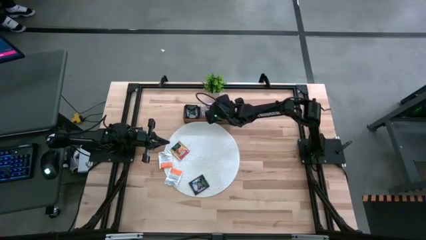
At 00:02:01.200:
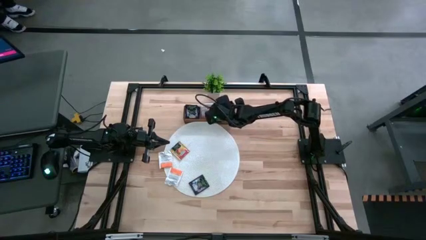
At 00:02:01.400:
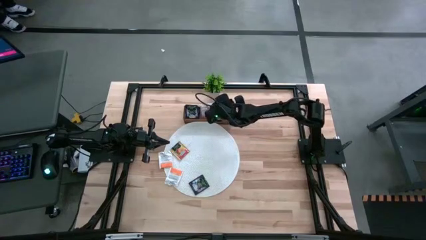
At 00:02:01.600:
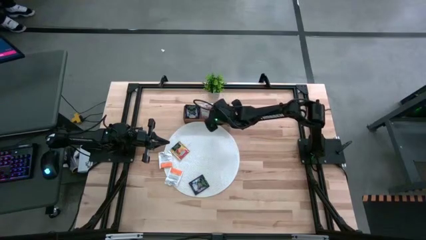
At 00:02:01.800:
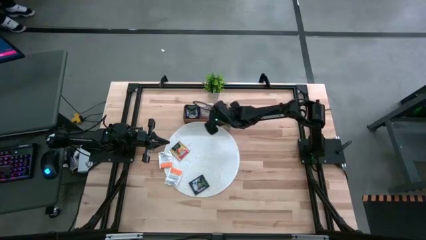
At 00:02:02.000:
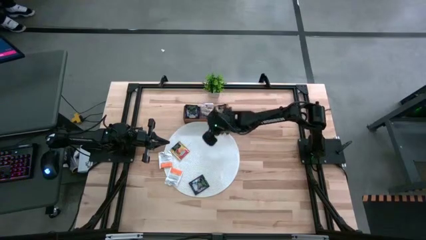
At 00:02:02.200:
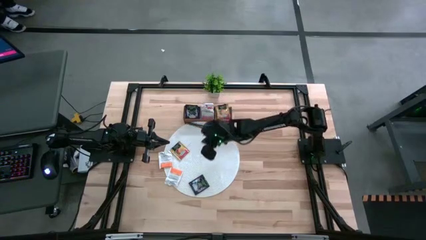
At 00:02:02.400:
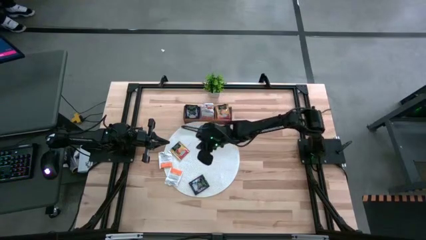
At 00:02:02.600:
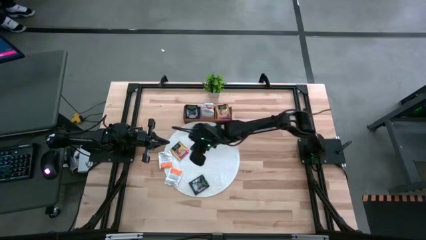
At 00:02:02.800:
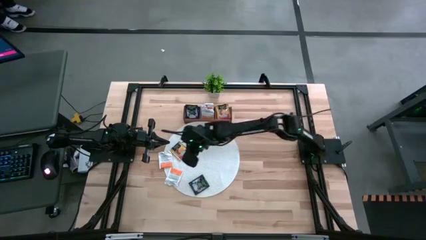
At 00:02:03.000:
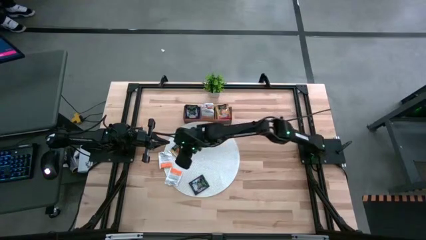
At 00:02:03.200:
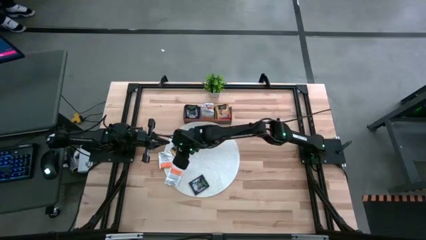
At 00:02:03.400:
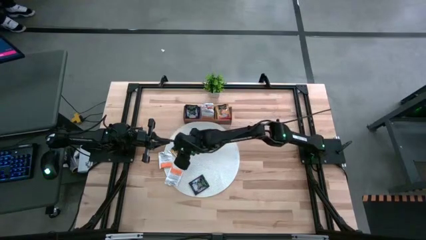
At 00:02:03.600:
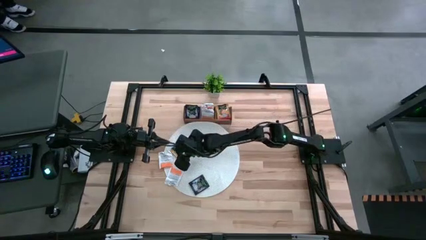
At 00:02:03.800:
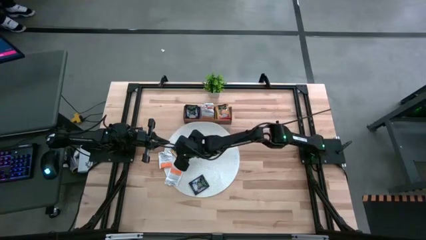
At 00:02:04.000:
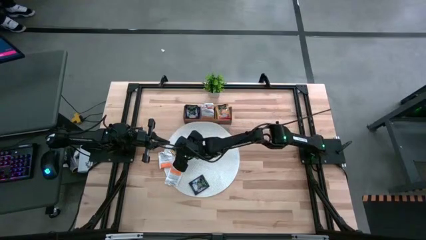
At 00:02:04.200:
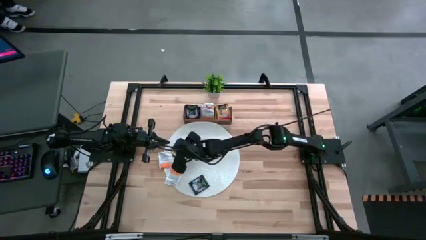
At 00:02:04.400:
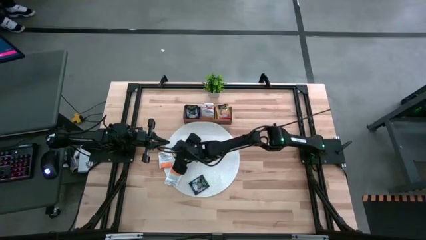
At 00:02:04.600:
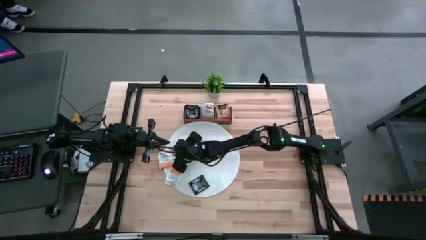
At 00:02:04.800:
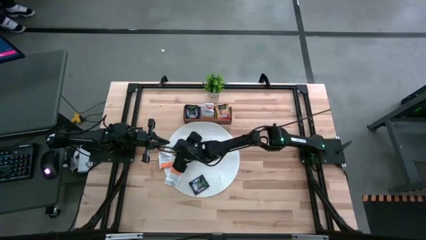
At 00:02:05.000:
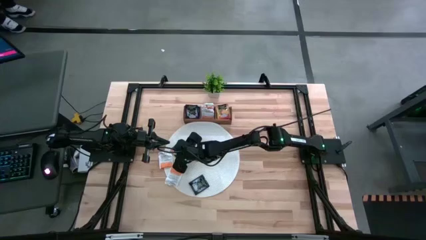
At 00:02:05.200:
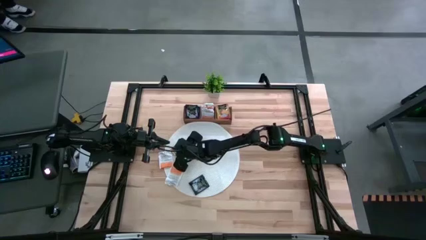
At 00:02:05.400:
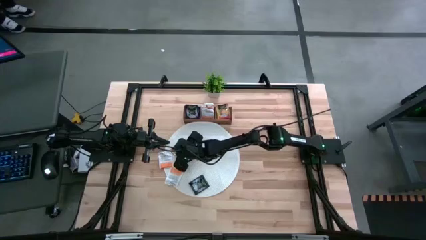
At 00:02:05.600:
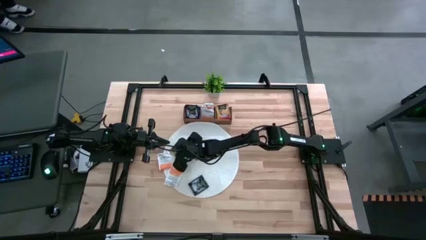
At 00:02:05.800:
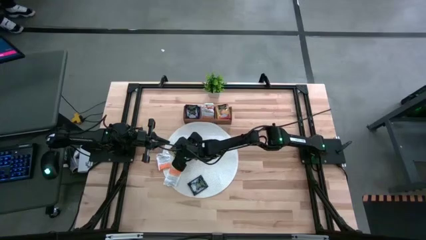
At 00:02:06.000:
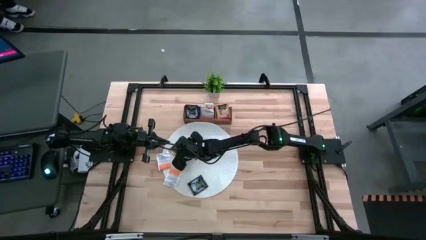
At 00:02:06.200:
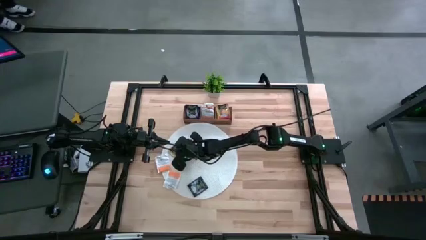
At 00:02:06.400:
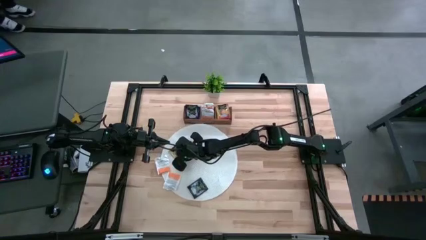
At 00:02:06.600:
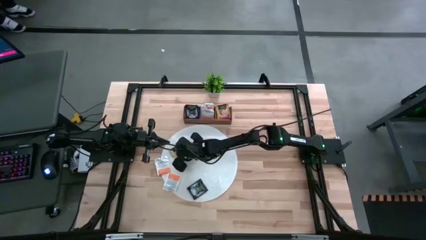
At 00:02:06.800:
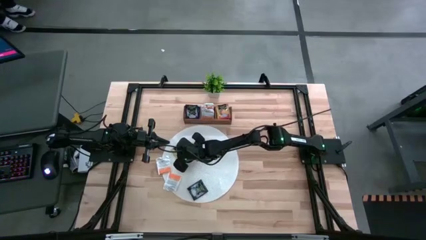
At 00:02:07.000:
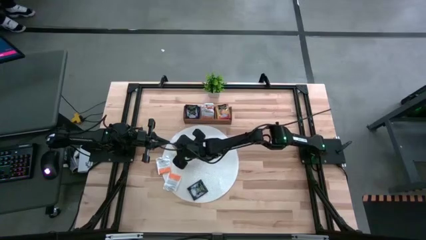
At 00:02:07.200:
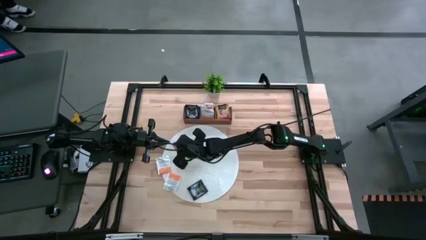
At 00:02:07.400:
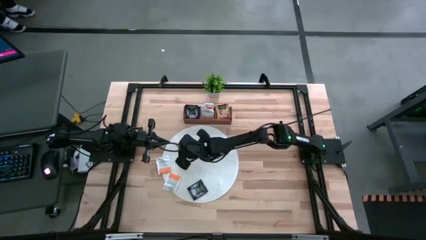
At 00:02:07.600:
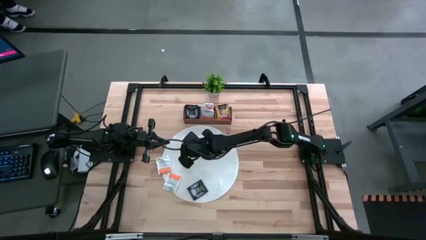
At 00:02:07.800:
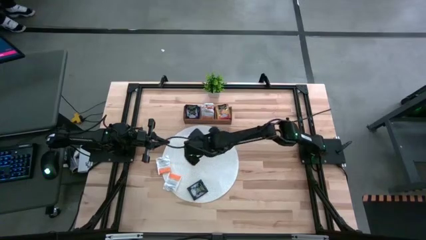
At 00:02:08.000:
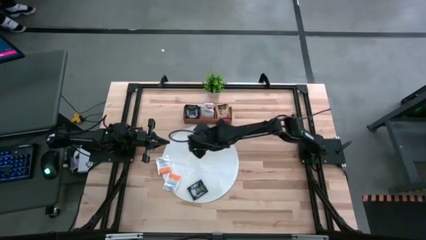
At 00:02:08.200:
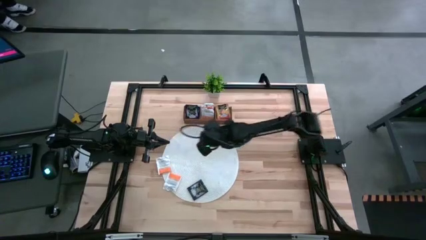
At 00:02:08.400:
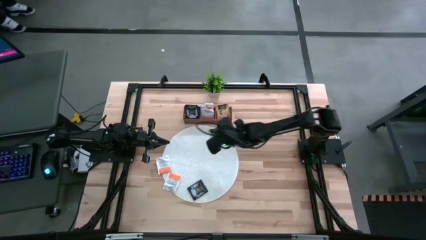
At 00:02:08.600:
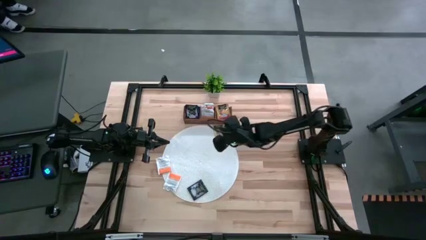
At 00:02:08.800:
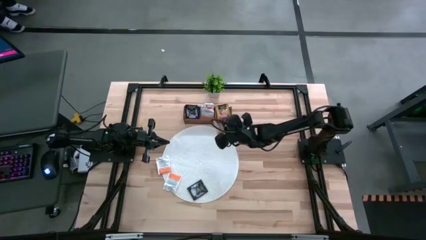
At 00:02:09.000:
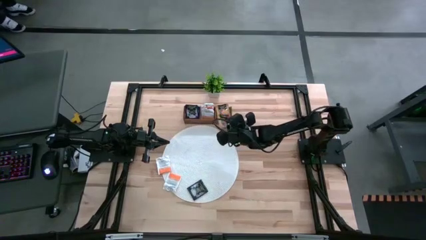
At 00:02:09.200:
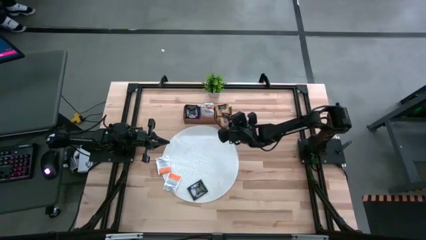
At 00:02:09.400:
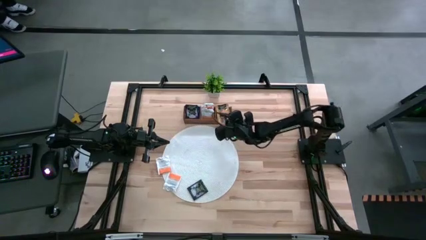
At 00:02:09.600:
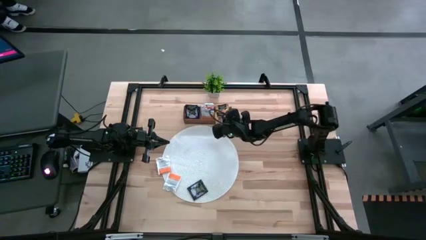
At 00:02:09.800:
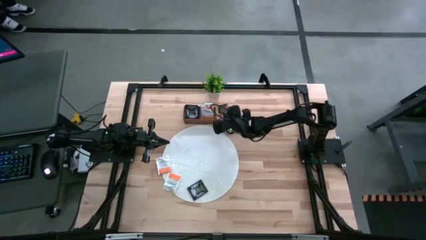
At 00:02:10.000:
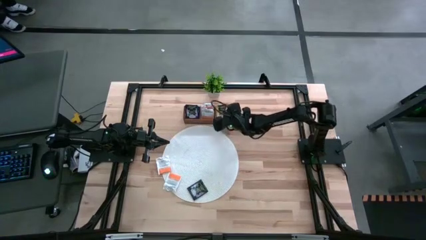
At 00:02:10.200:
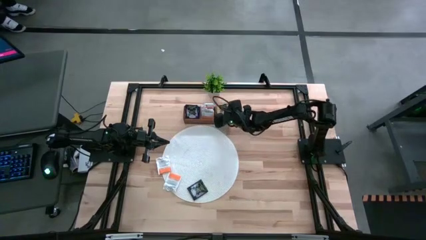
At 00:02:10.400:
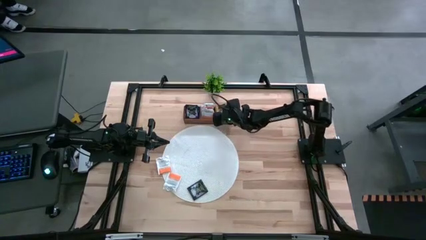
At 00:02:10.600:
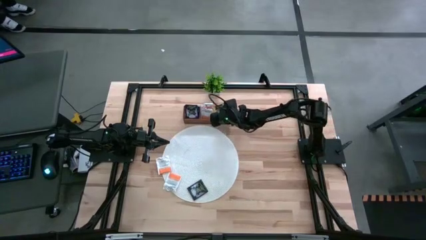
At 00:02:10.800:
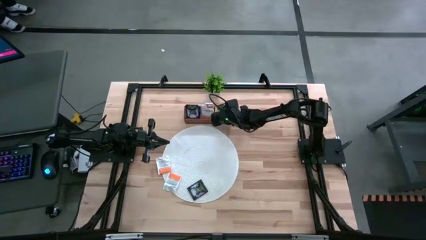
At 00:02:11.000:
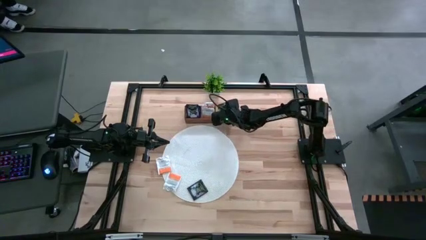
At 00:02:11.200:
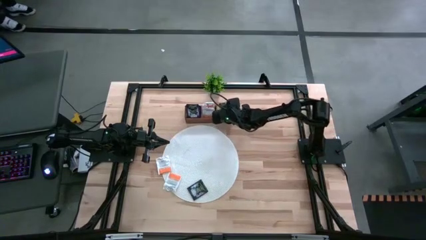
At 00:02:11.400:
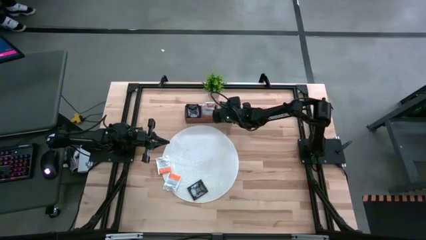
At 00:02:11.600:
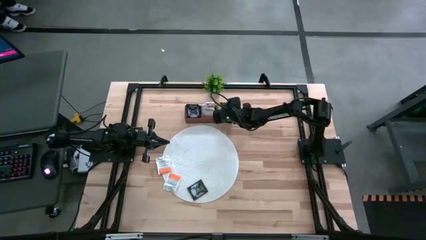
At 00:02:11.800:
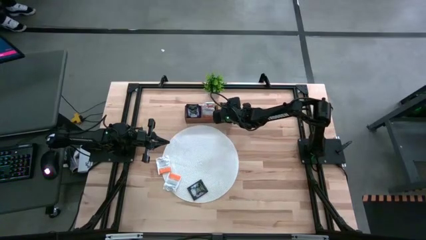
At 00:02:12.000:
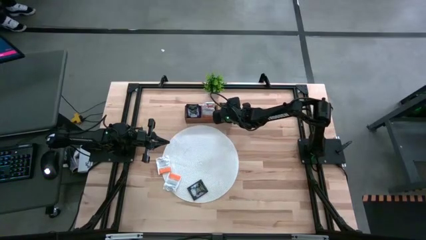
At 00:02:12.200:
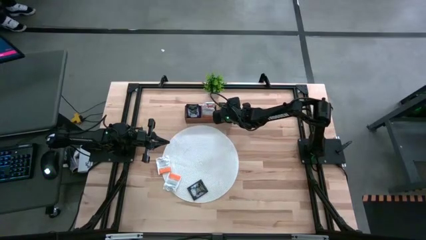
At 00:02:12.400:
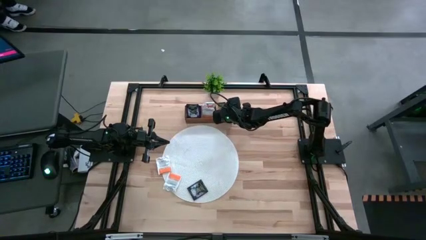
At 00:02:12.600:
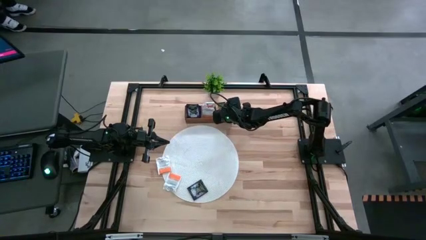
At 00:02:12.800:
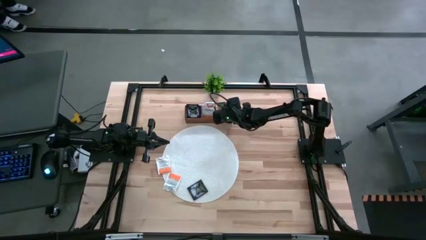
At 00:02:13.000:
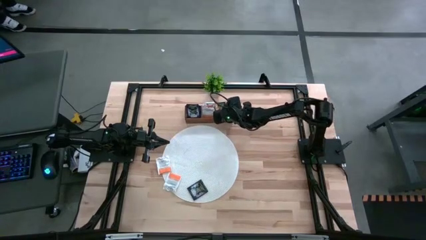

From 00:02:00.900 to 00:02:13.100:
Task: Pick & Place Tea
Put the yellow tea bag into the right section of the wooden organizer

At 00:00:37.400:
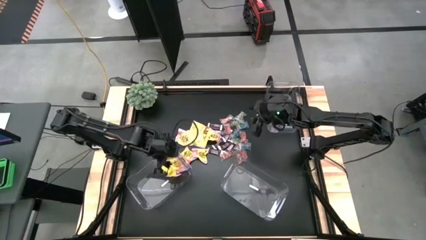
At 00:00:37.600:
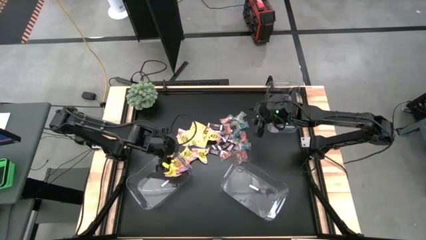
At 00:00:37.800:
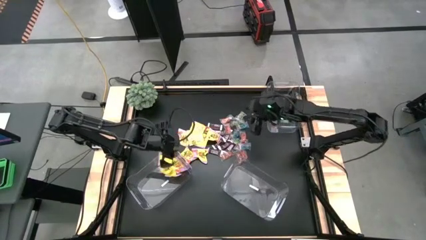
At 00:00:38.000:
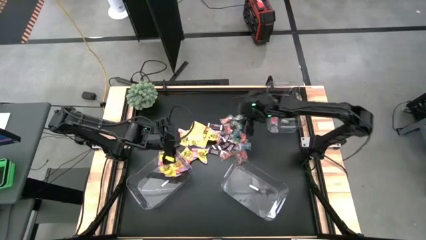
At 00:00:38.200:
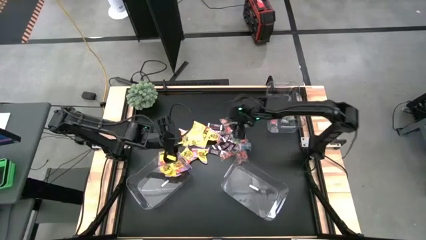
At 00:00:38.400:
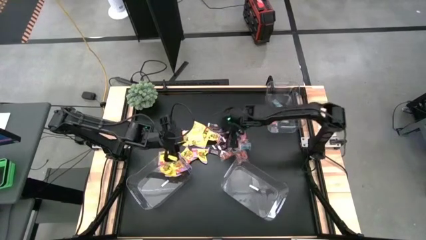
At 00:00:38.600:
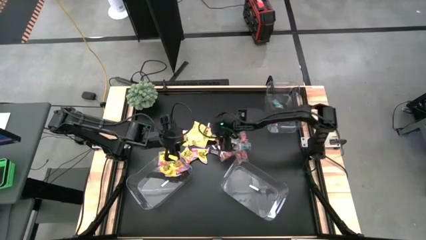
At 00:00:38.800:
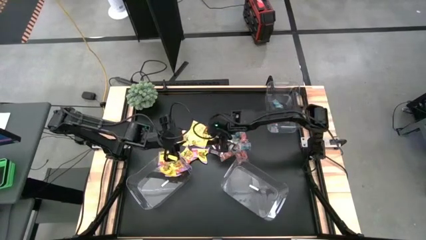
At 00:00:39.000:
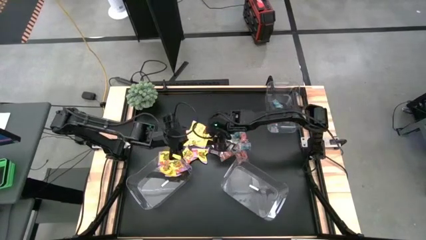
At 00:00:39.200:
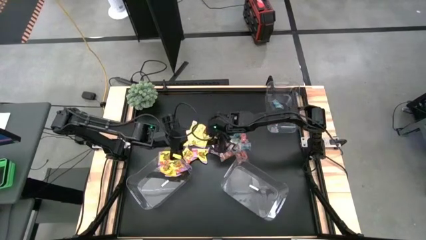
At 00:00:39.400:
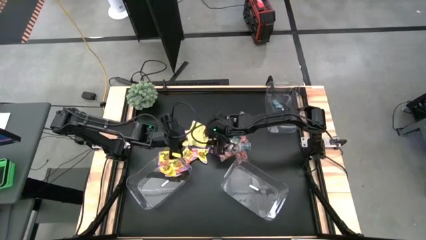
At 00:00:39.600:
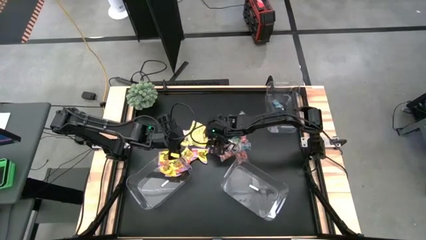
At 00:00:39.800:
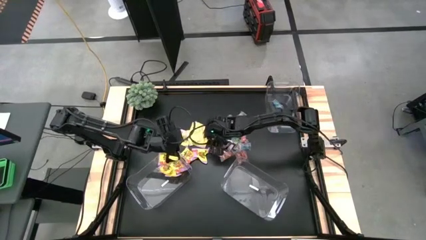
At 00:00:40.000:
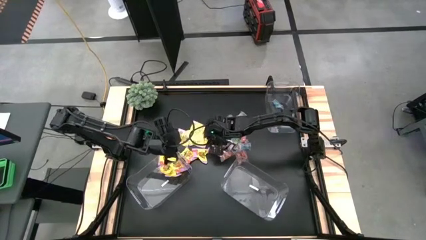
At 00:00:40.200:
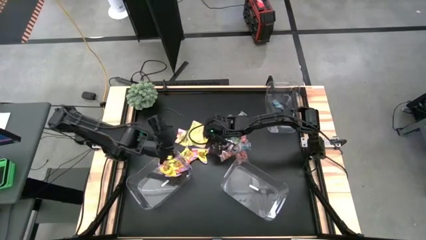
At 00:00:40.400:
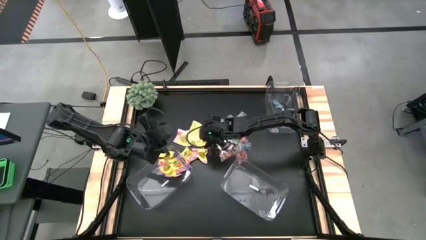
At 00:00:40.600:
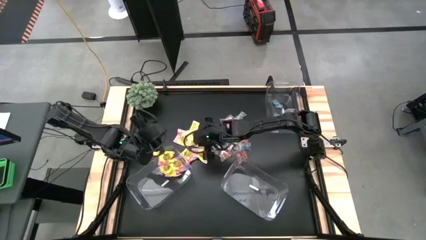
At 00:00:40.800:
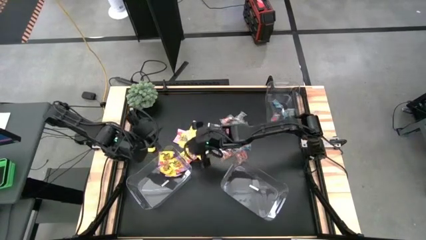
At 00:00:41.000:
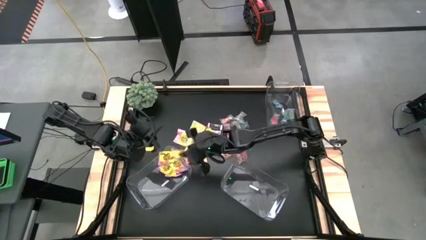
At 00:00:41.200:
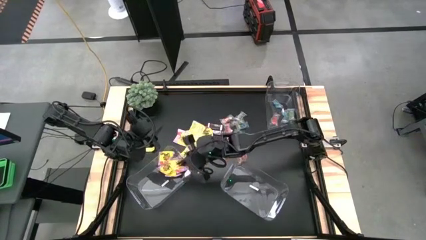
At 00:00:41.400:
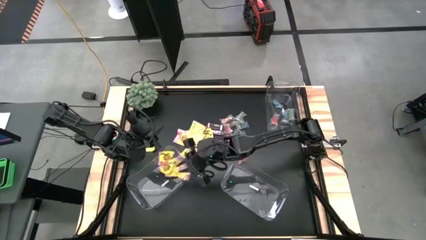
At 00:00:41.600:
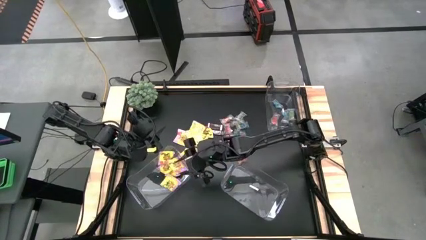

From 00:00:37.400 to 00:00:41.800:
Task: Sort candy
Put the yellow candy in the bottom left transparent container
